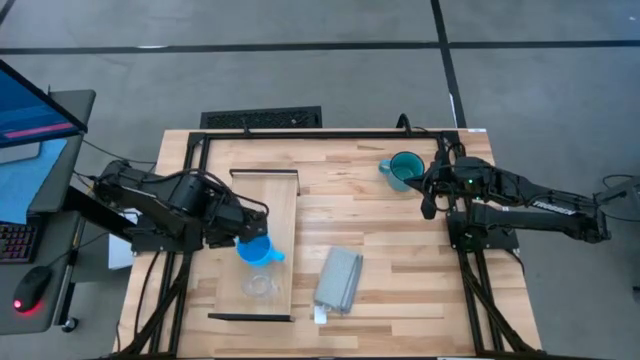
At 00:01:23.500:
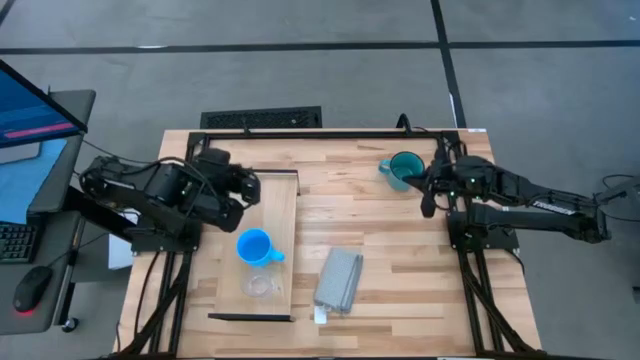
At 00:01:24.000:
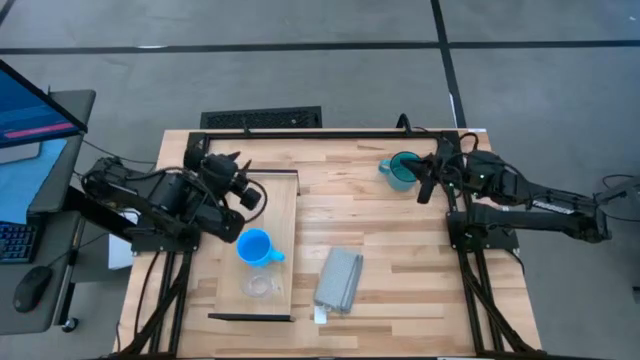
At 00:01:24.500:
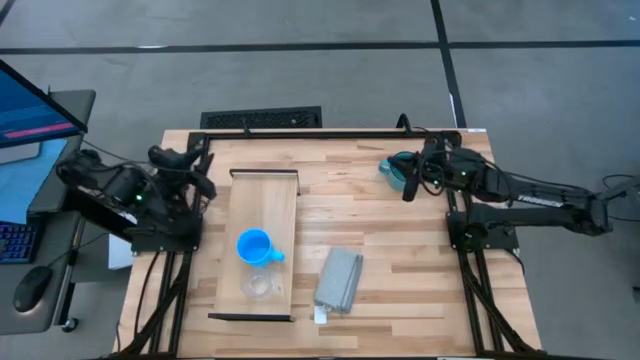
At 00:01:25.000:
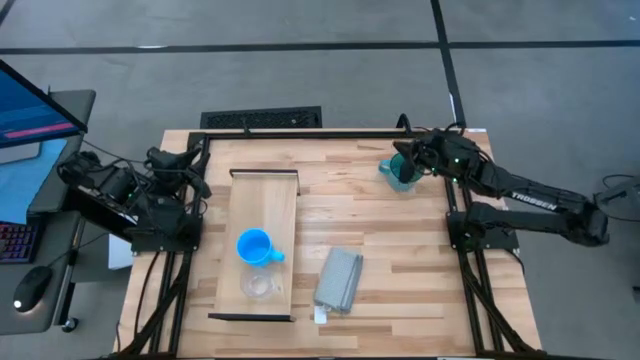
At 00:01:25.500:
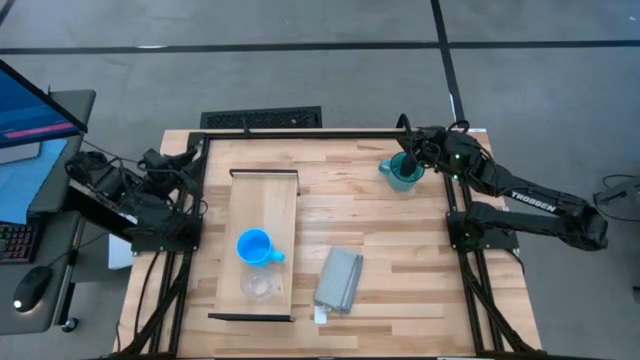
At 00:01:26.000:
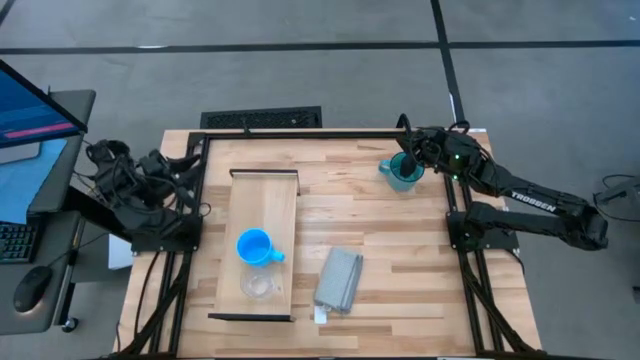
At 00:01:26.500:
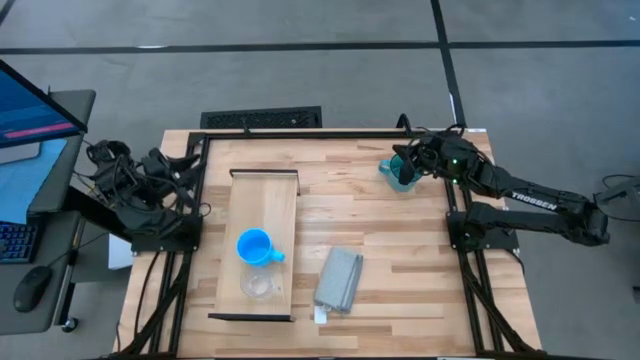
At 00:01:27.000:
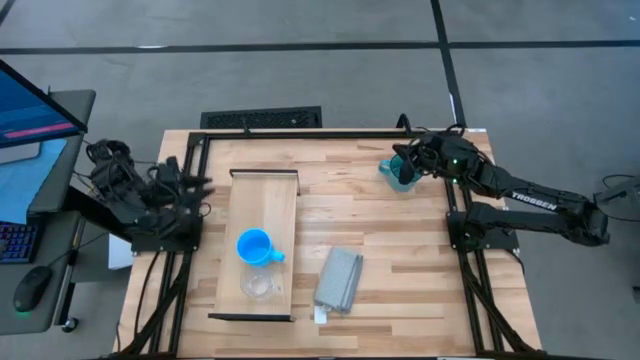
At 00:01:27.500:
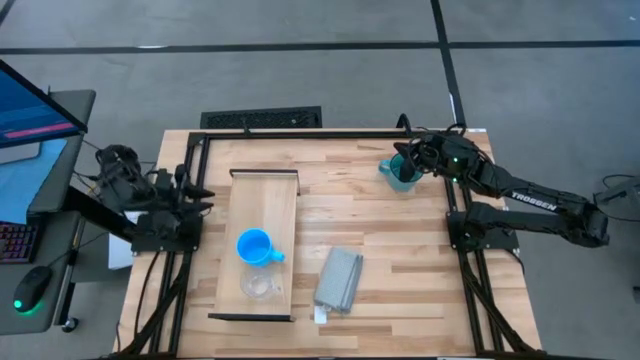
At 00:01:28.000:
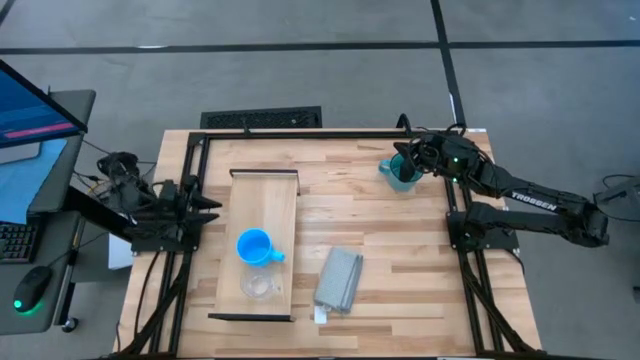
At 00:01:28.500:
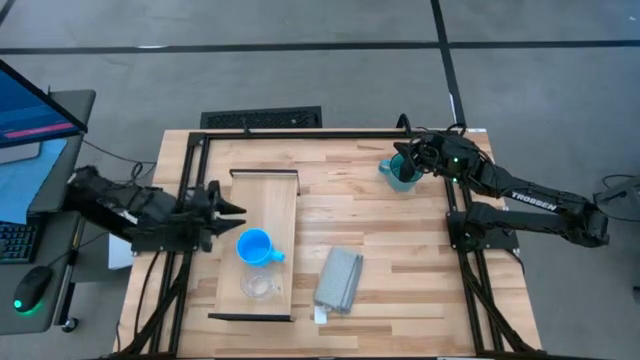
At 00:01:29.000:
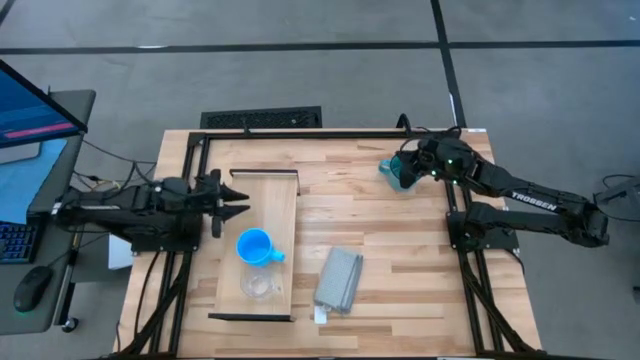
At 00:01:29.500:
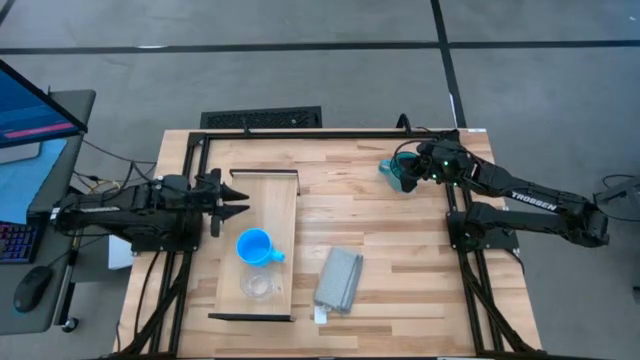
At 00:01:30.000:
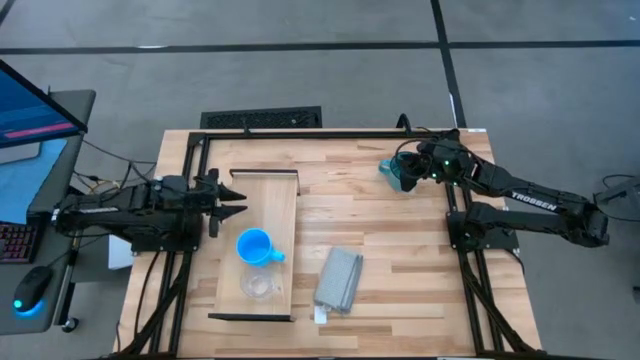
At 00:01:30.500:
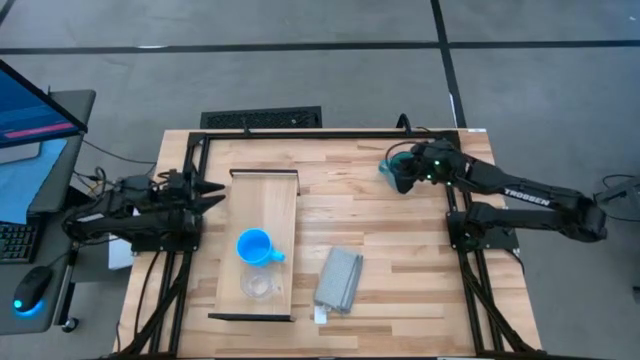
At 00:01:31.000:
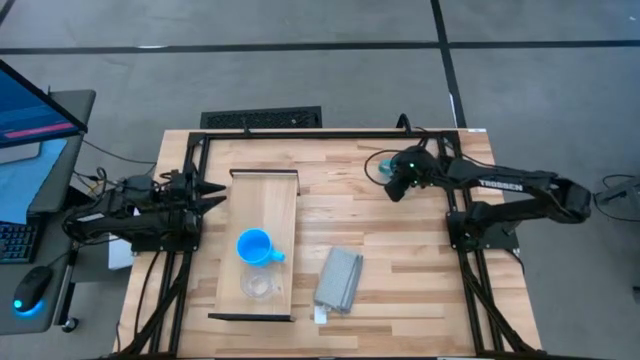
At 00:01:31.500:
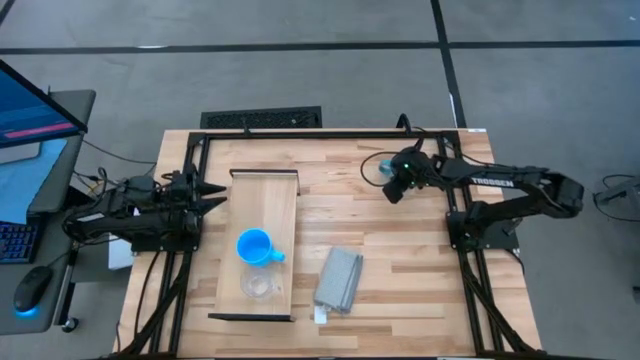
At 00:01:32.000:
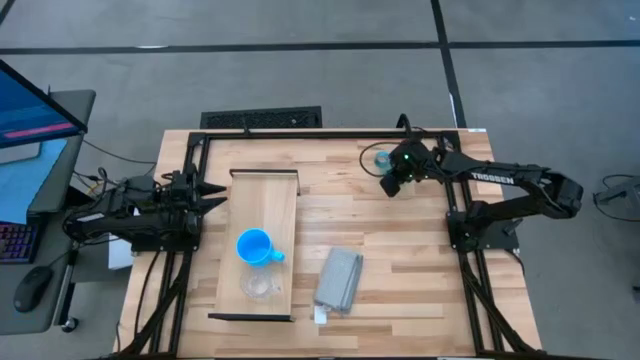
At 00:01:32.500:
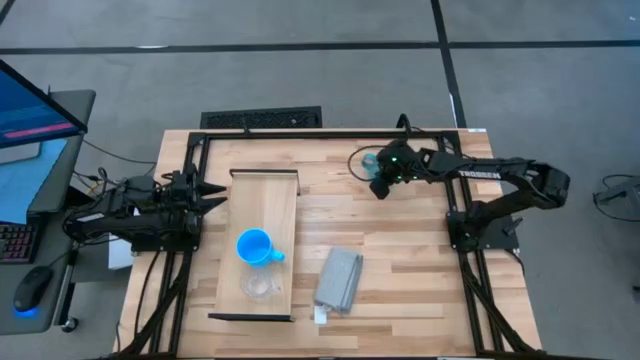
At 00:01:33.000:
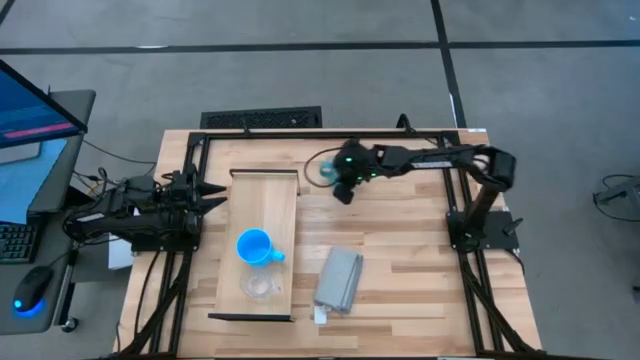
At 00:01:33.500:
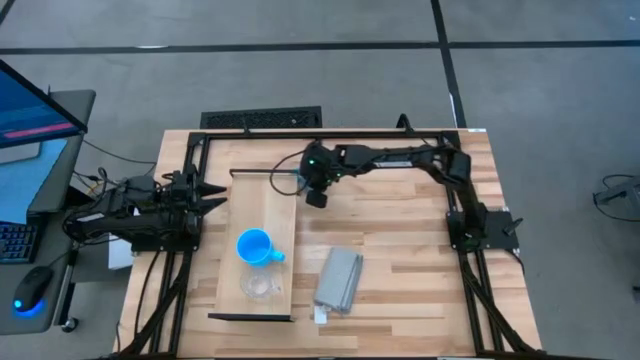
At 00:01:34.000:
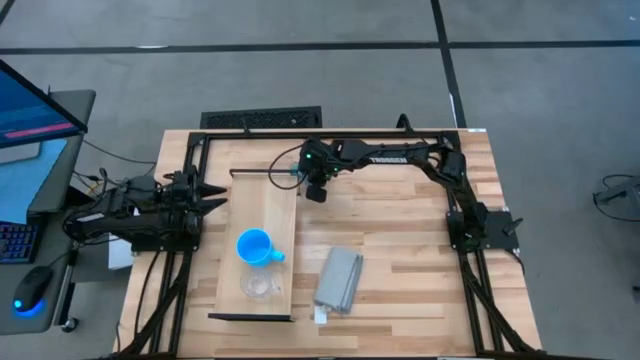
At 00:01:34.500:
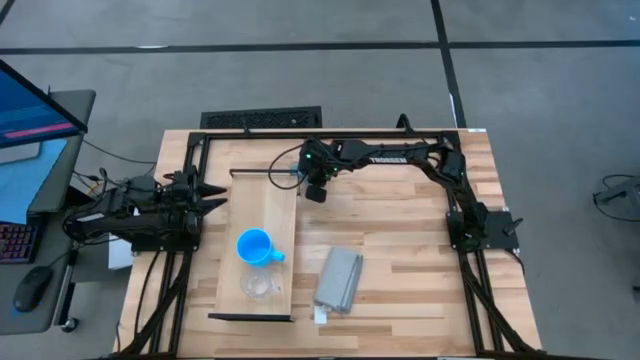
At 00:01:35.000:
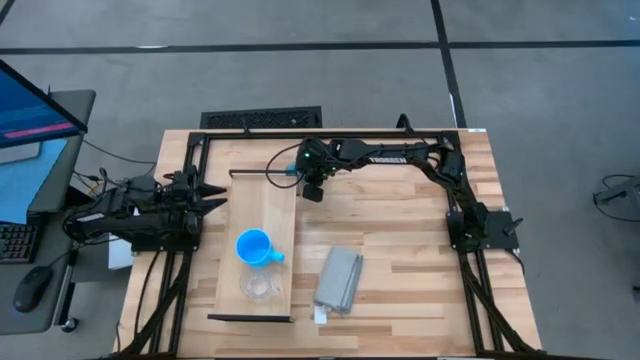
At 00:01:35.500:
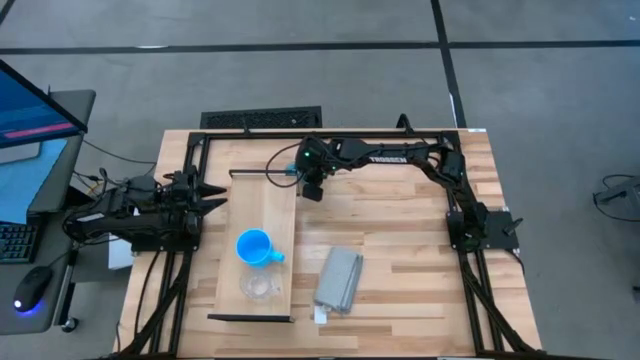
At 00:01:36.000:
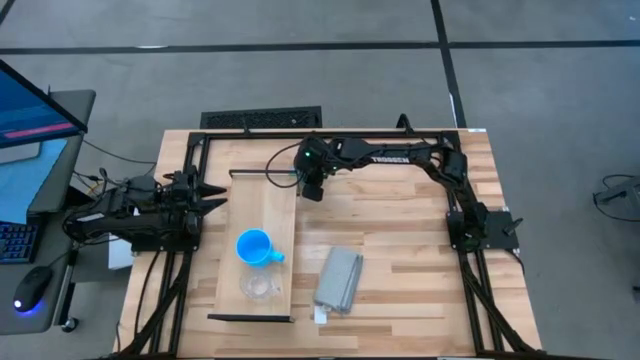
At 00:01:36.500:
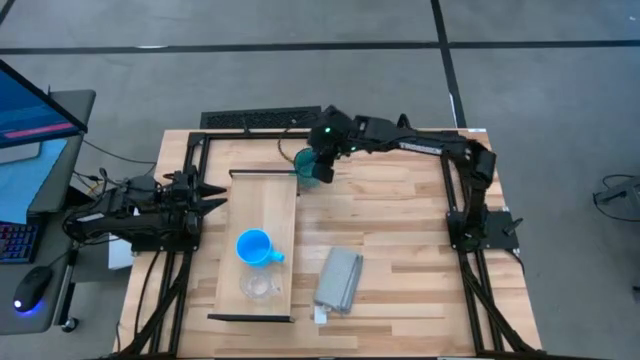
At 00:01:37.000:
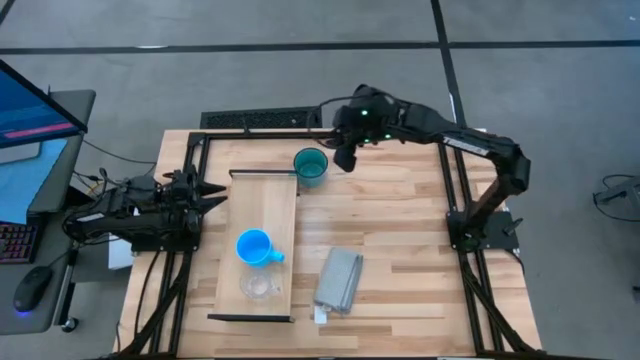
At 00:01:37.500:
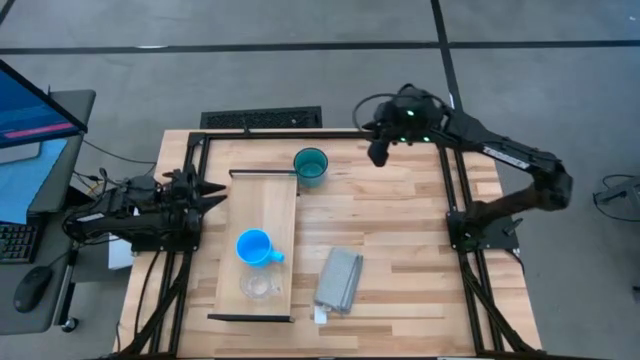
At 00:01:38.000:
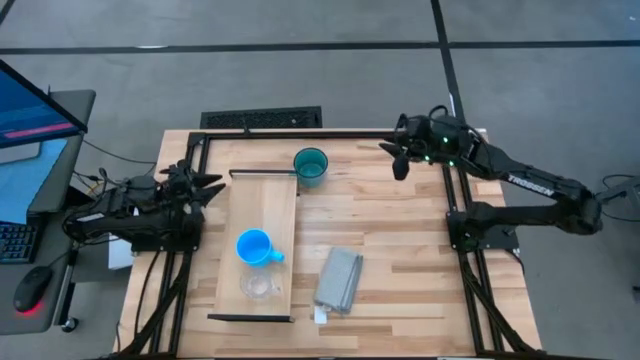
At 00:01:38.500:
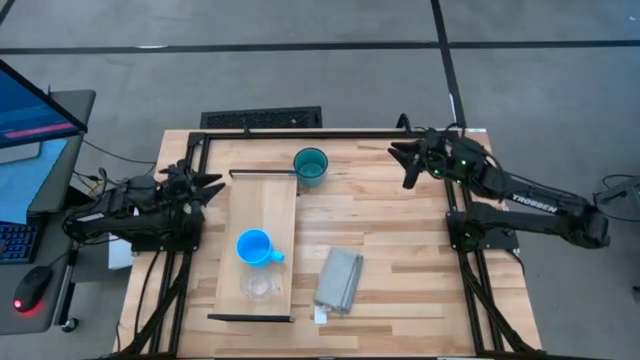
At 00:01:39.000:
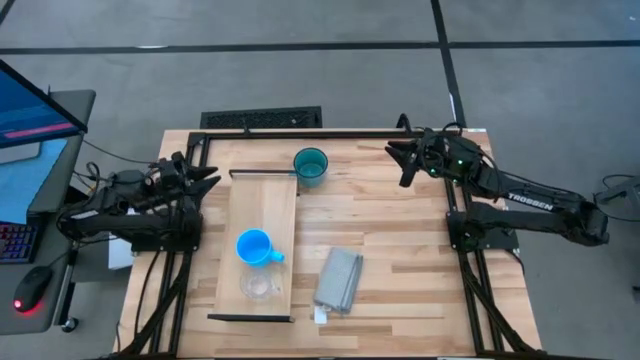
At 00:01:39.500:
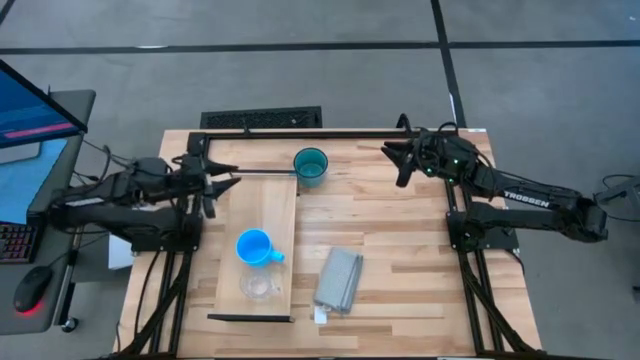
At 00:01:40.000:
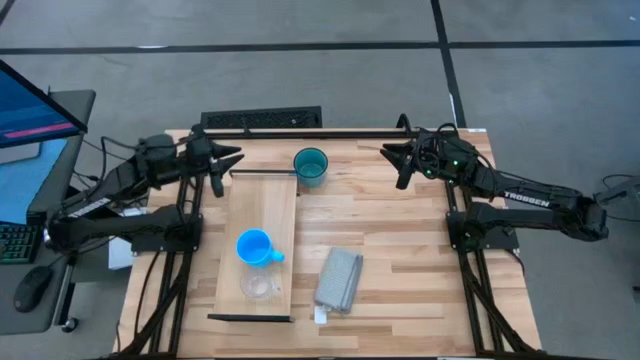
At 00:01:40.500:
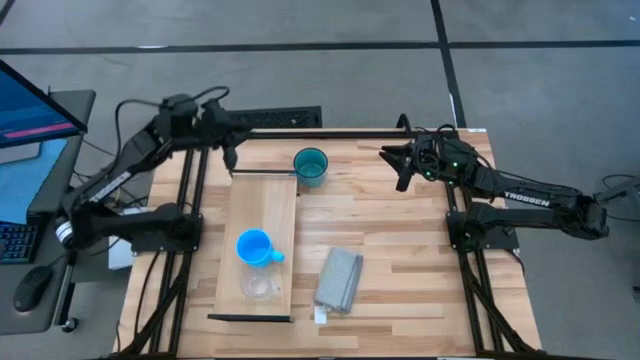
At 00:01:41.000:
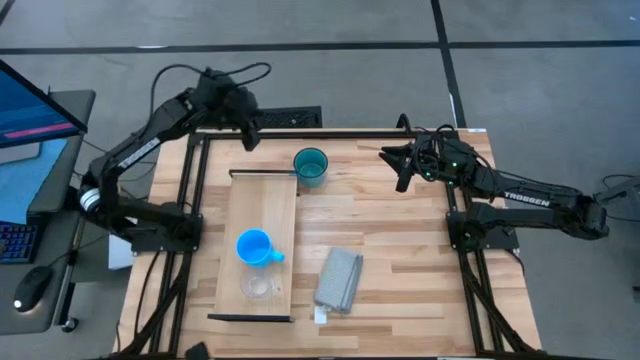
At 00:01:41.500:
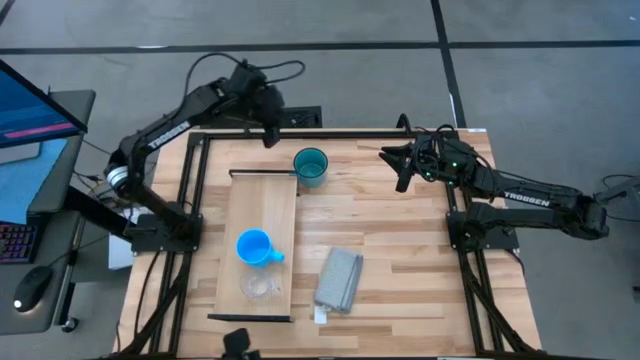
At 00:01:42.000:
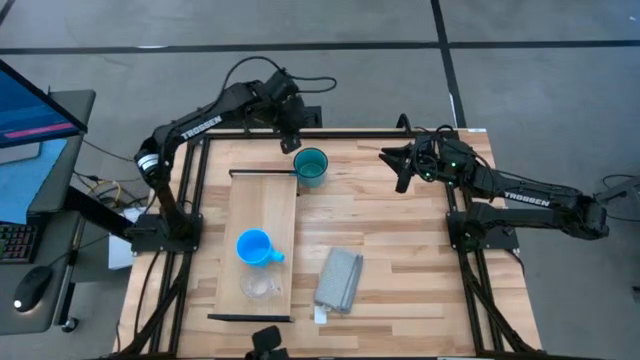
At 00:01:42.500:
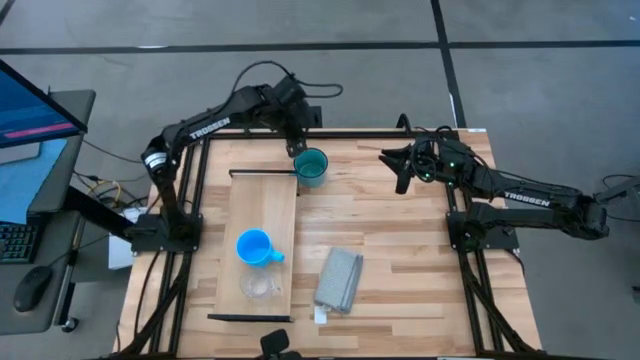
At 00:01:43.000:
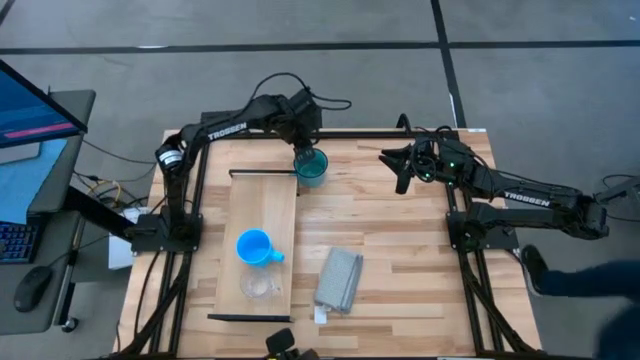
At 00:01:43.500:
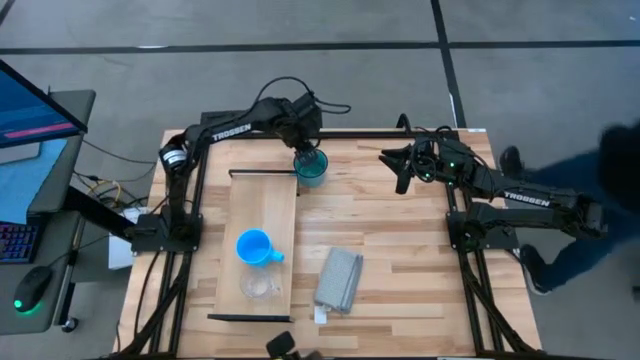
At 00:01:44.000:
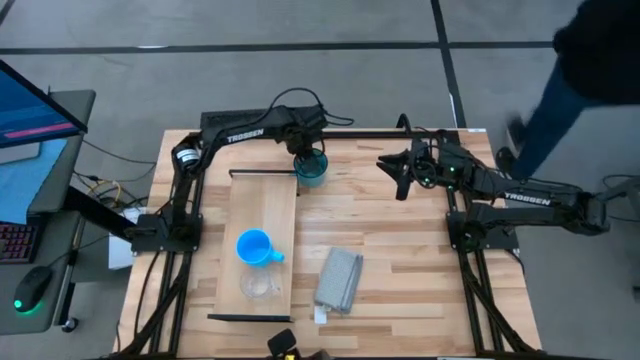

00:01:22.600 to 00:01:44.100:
Task: Stack small to large cups/mugs on shelf
Put the blue mug on the shelf
